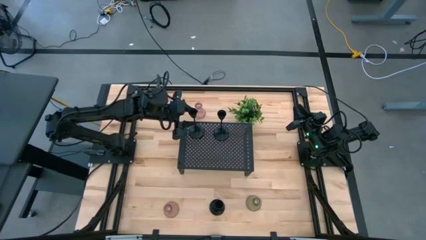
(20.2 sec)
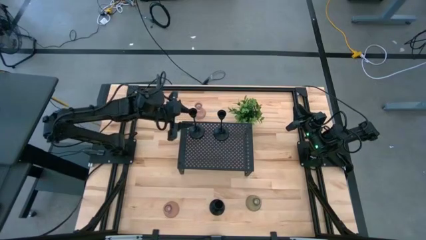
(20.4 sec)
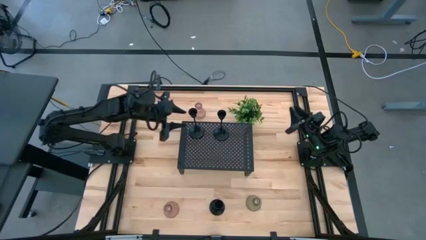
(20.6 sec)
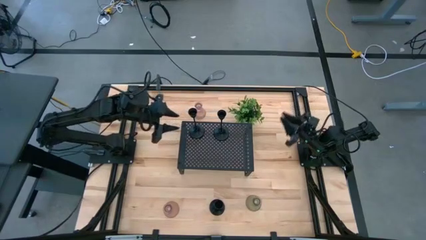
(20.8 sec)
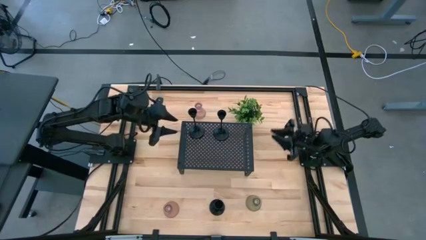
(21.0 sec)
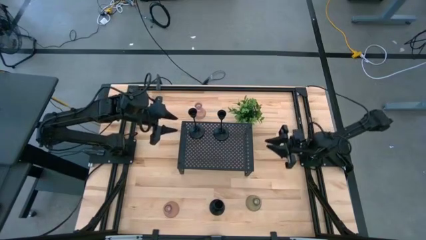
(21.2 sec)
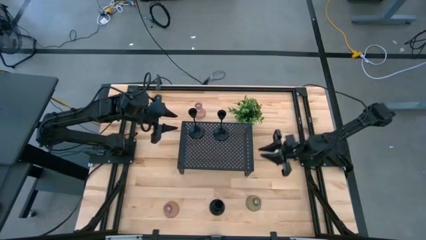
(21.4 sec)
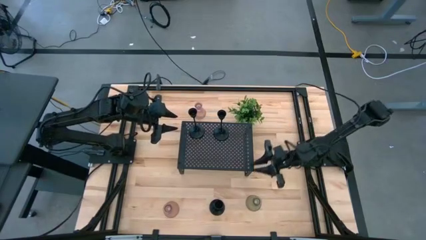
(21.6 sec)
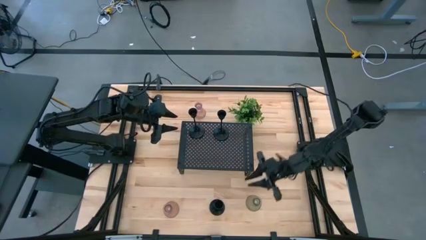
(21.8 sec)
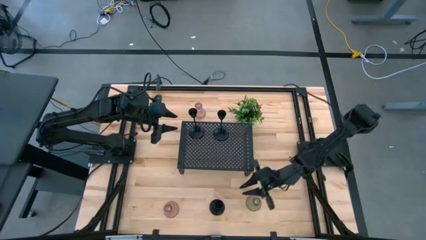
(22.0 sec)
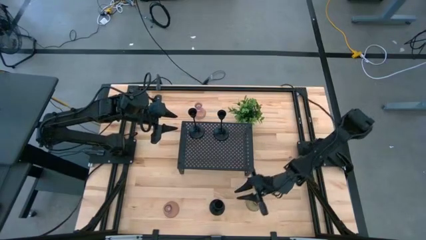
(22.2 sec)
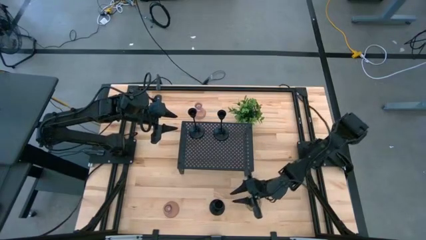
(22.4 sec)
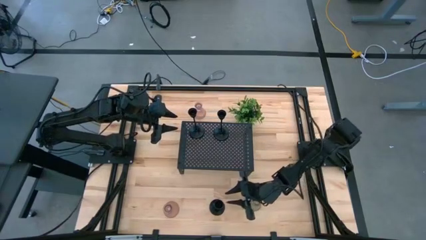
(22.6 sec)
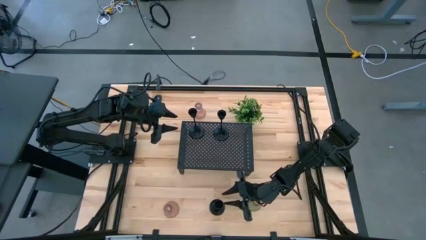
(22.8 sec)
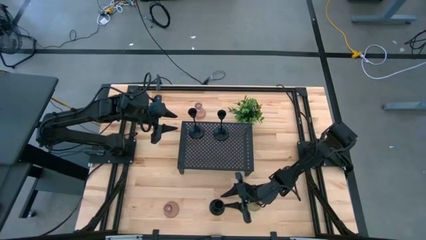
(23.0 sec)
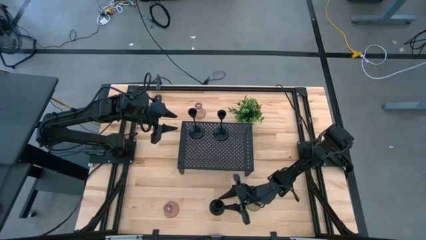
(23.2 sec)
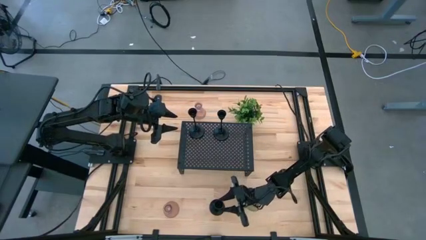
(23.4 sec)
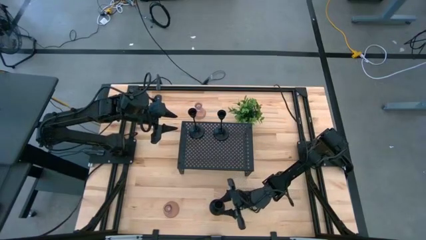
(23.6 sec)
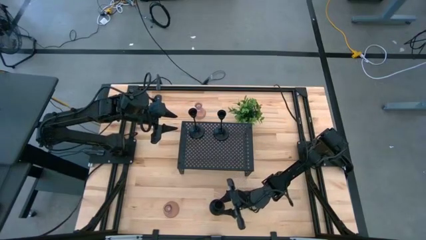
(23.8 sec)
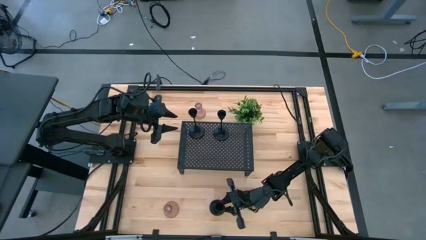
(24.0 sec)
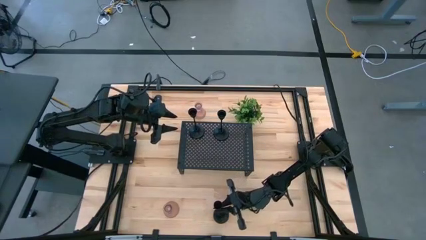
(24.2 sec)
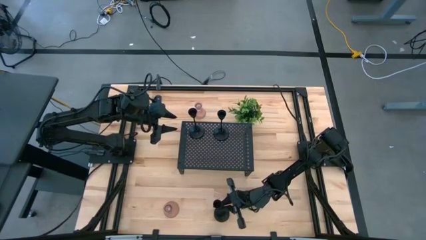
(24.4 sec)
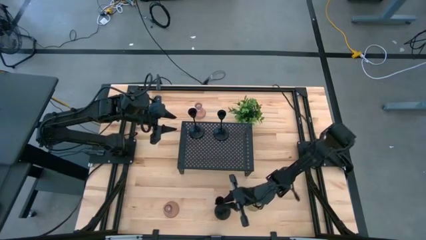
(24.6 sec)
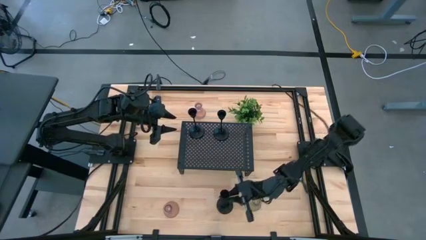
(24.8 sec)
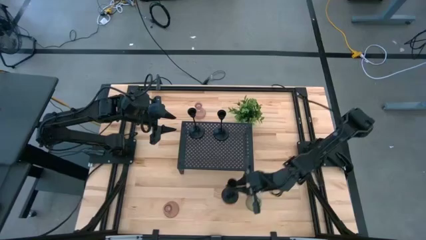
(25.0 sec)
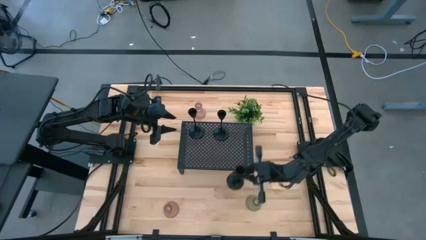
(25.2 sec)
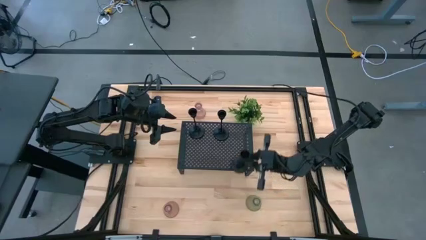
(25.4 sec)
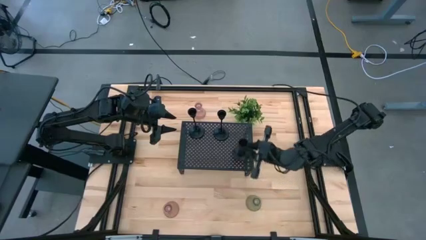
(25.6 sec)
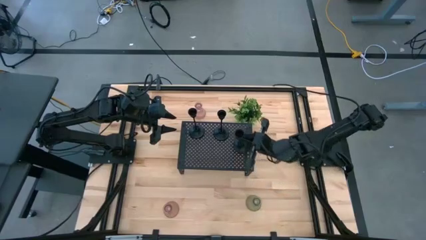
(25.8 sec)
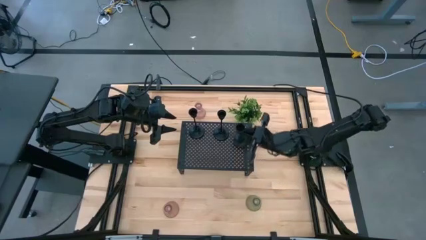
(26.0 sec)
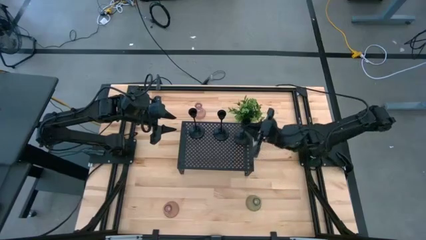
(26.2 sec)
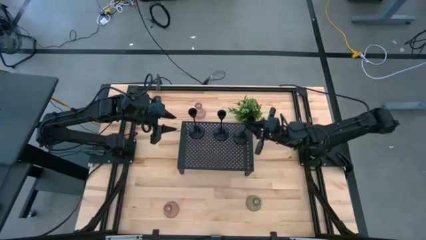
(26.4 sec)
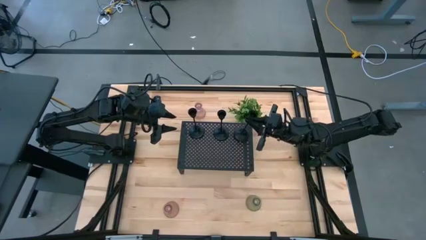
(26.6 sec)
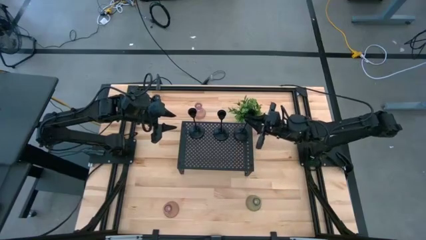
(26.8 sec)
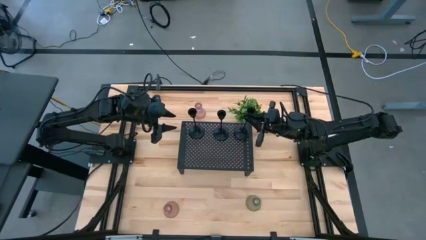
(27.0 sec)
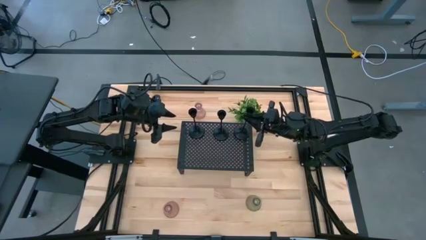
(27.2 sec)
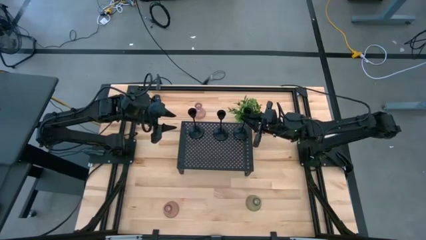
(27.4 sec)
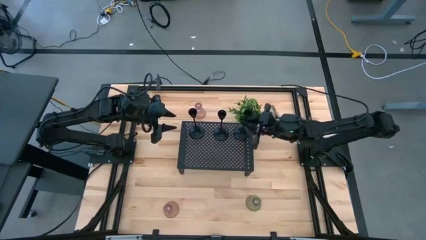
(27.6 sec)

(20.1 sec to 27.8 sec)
Task: Pick & Place candle stick holders
Put the black candle holder on the shelf

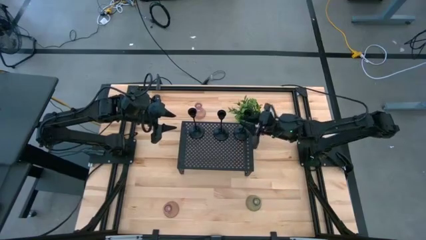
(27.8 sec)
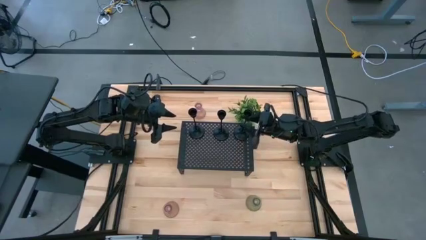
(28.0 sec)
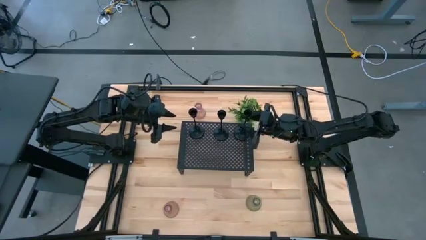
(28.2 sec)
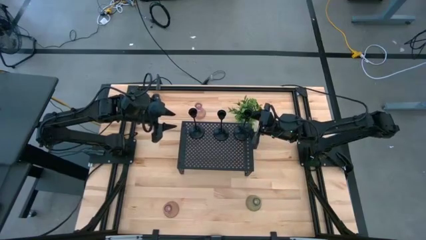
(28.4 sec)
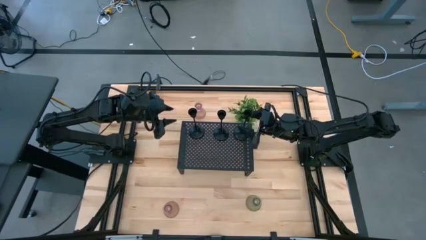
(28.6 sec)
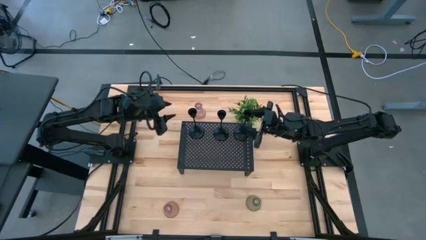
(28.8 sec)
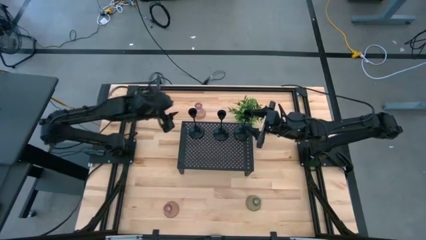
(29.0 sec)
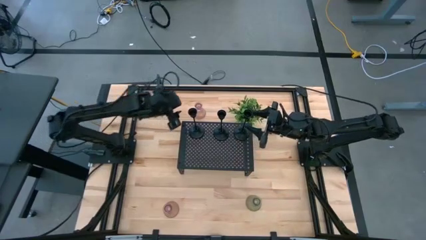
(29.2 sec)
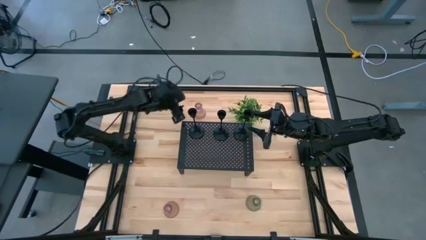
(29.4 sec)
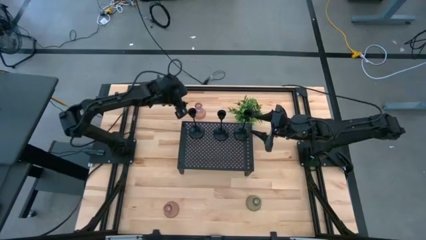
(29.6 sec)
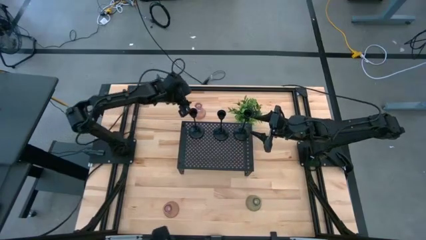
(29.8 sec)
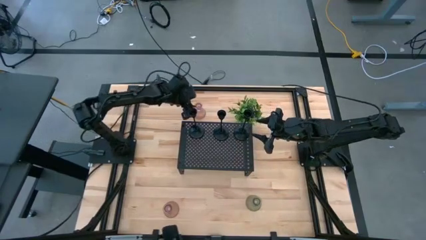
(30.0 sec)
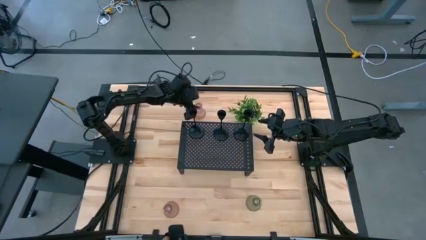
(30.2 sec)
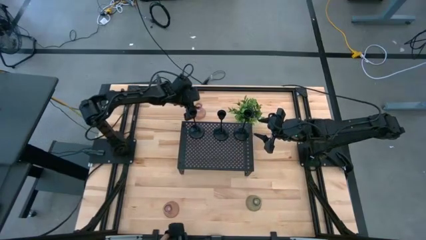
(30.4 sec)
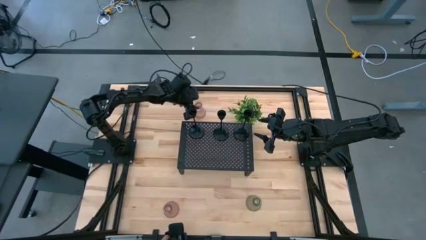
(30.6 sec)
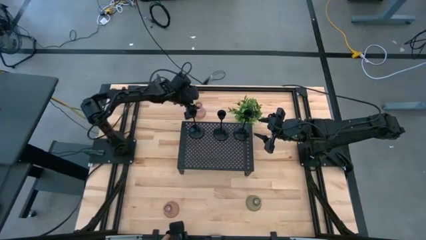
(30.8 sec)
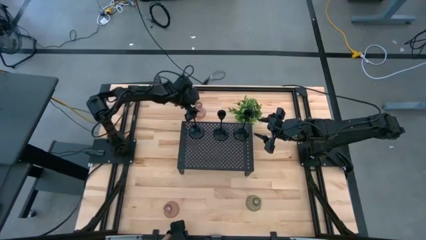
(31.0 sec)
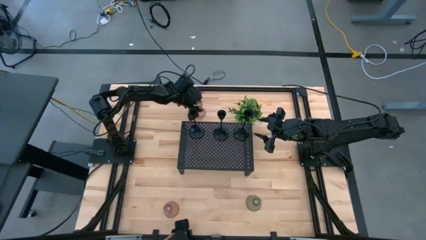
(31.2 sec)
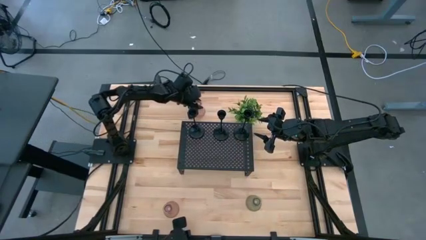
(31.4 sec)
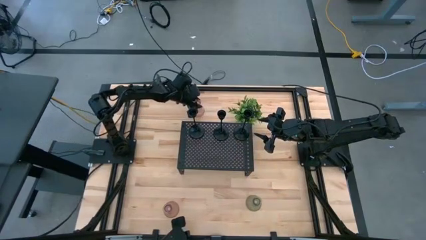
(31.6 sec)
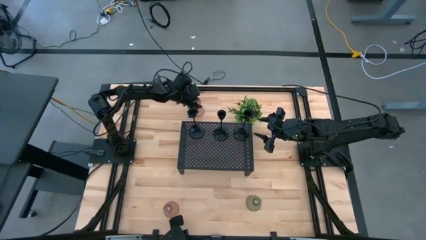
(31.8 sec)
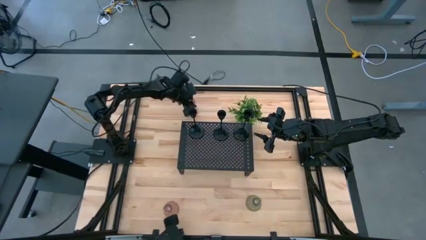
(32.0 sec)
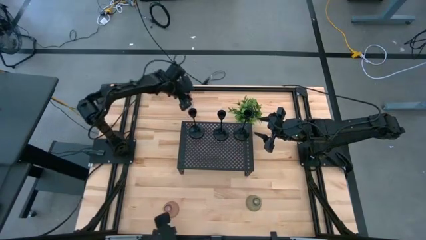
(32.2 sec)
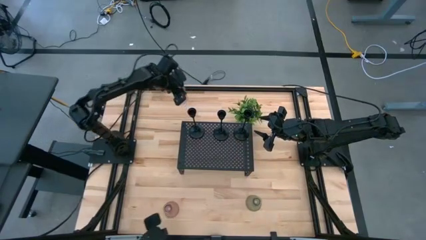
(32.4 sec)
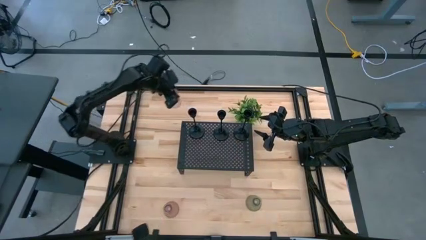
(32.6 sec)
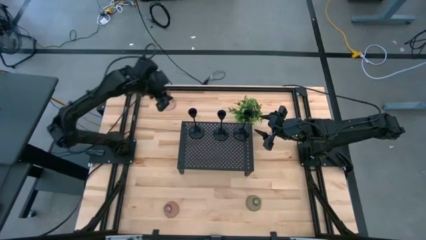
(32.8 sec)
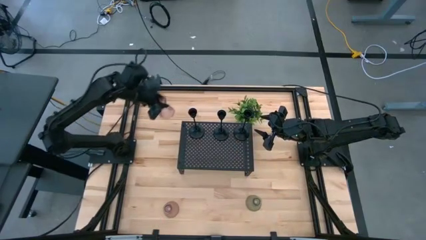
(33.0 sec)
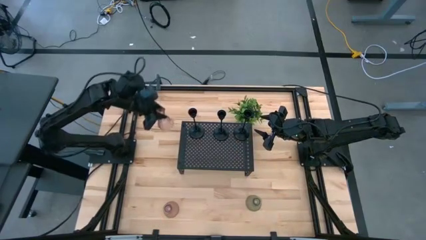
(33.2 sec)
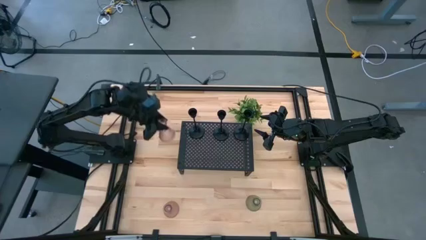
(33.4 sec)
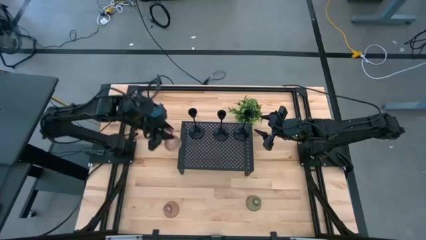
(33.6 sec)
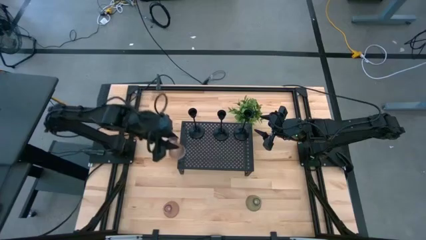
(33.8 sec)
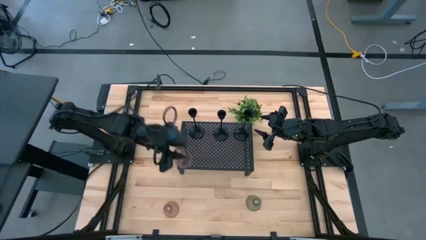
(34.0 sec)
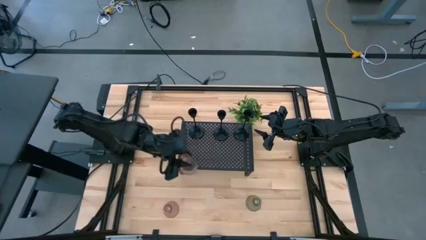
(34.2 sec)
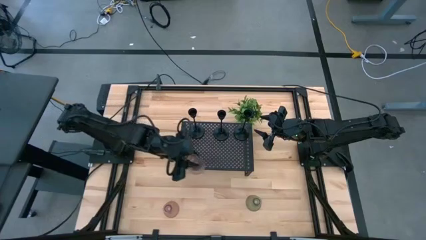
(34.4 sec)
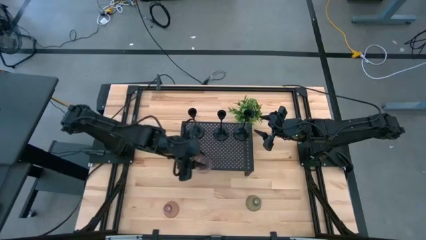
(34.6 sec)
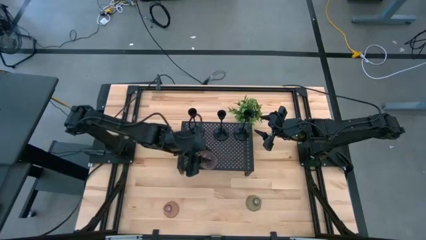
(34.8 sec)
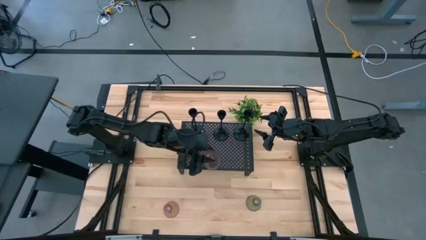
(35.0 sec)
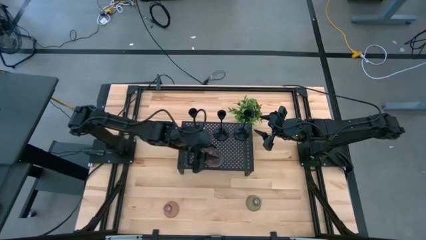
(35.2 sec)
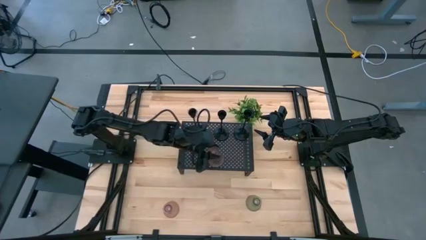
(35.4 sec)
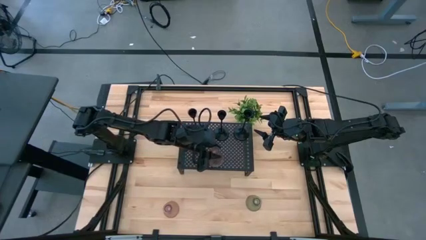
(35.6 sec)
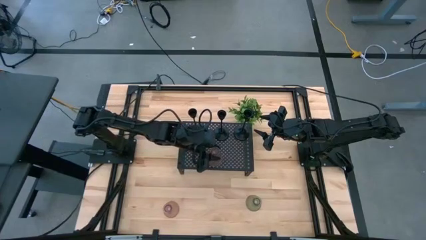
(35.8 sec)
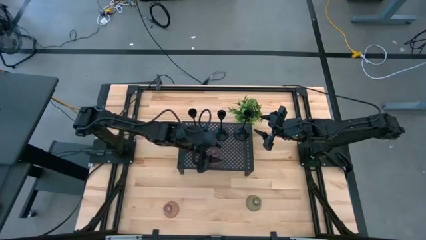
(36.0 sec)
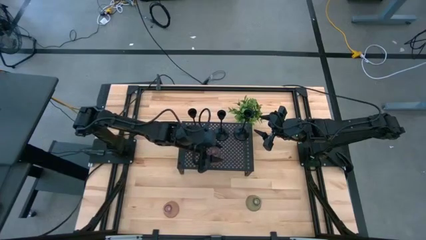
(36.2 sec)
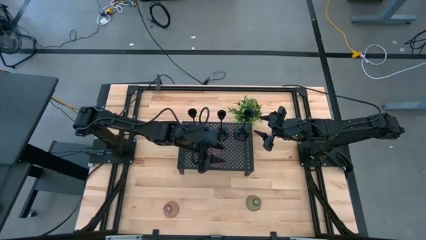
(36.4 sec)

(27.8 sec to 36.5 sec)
Put the top pink candle holder on the shelf
